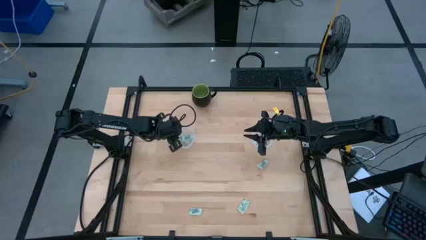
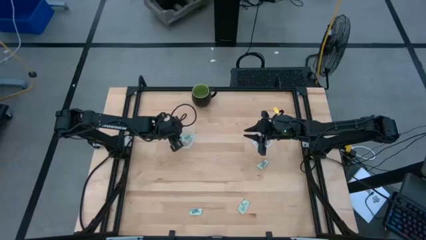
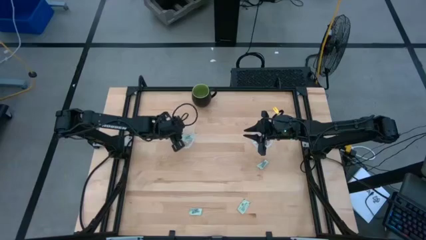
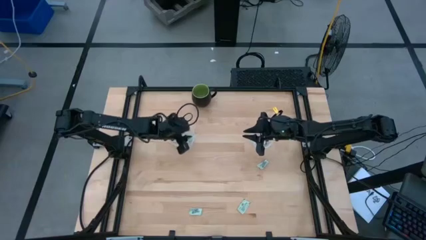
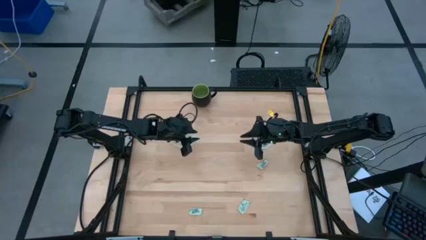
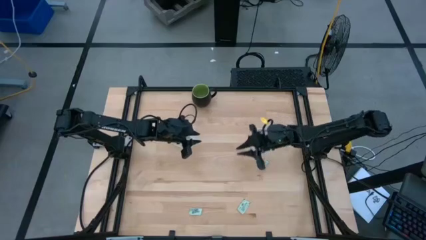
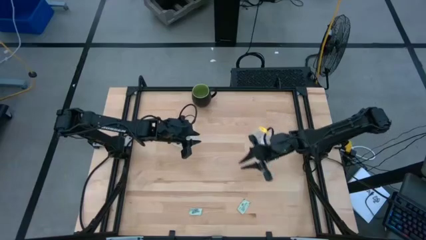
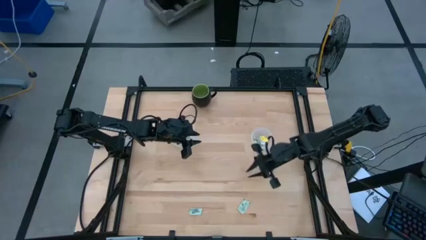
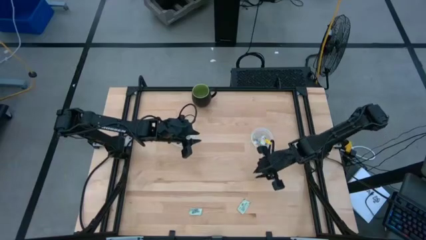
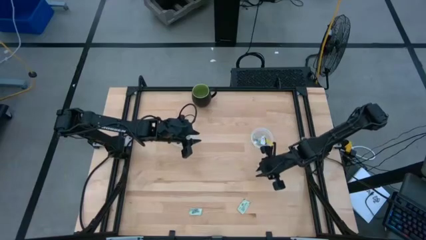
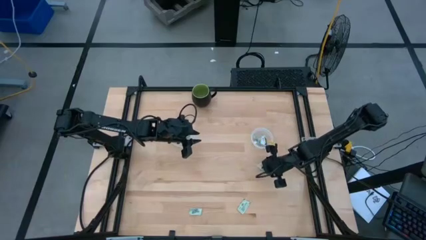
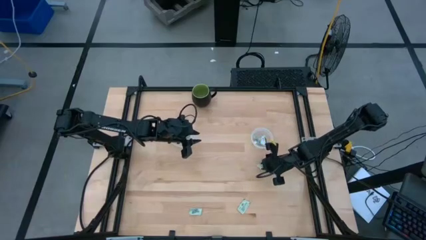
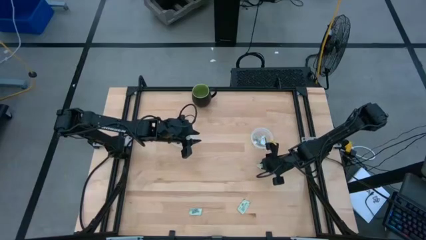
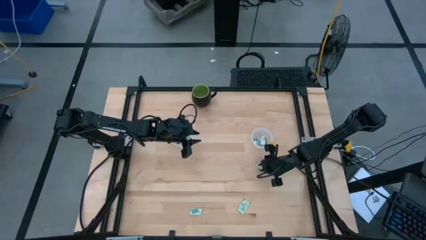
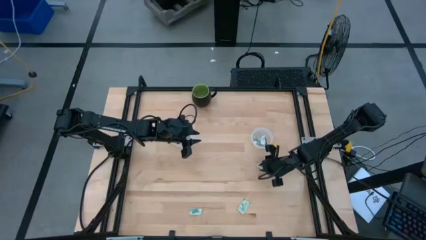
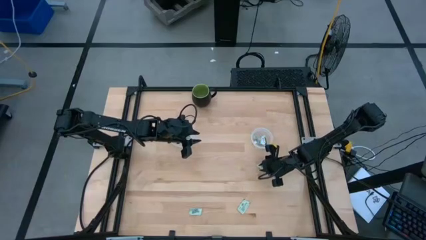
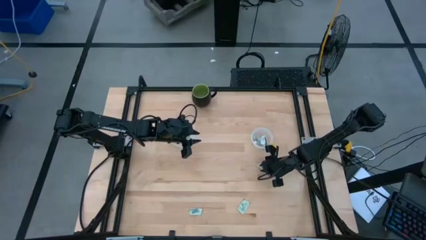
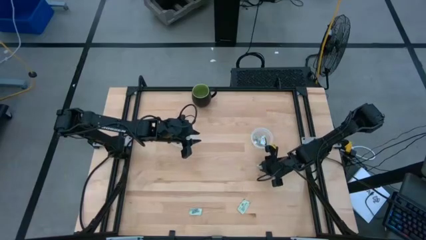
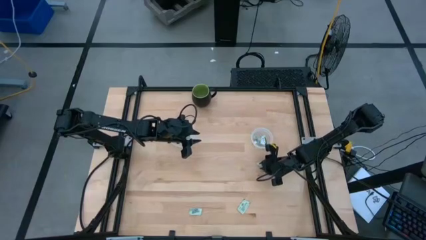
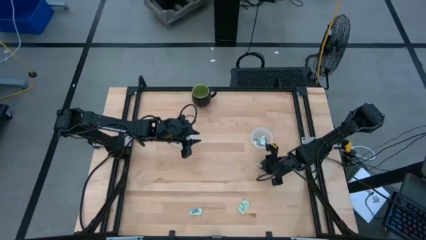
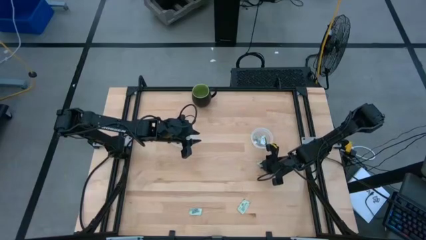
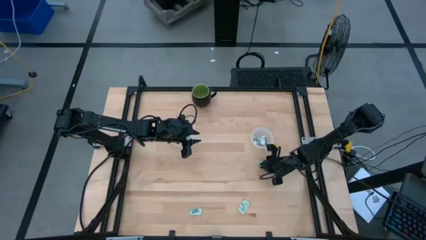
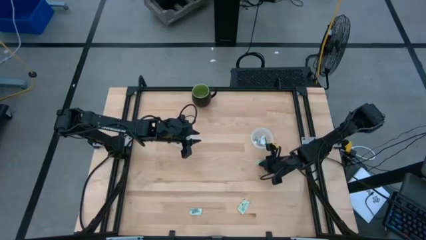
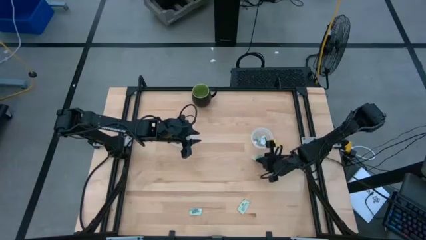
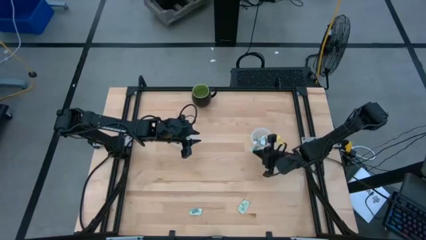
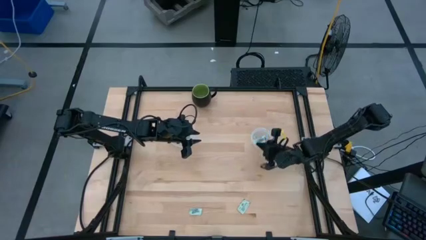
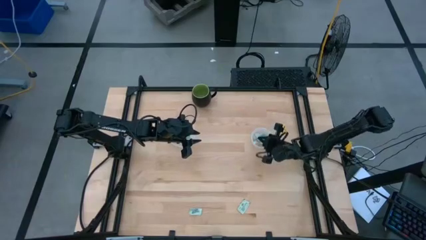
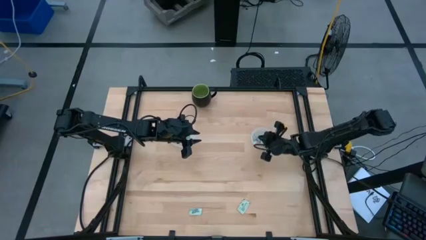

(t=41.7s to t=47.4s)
Task: Pick and place Stevia / Truvia into bins
Put the white stevia packet into the right transparent container

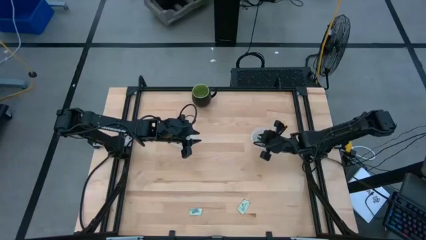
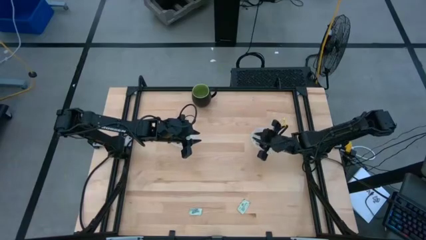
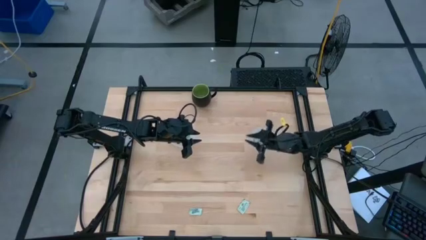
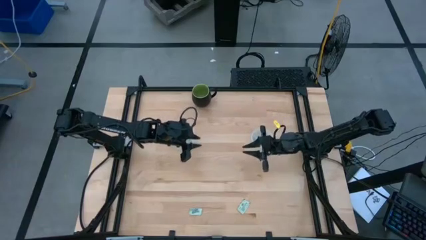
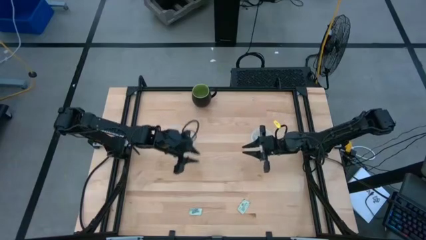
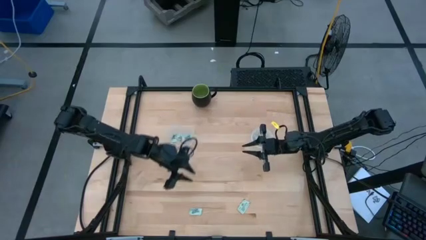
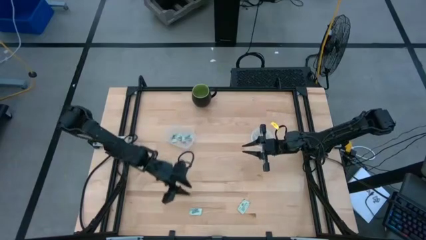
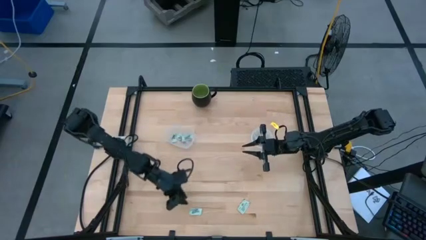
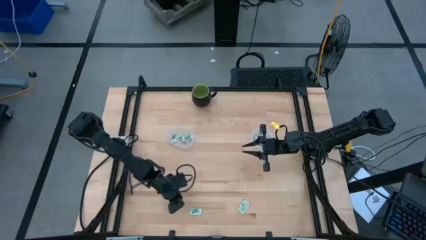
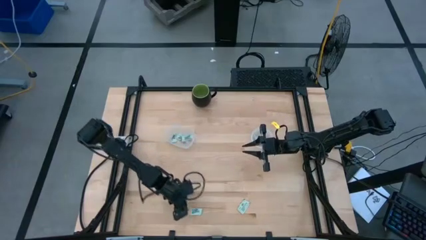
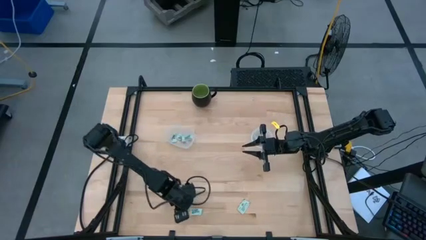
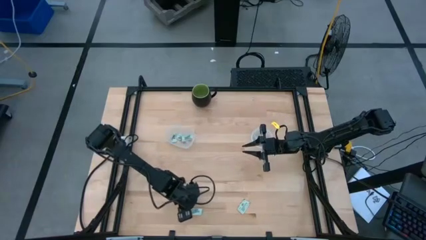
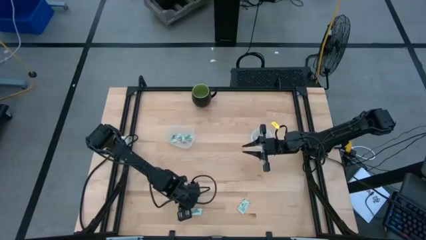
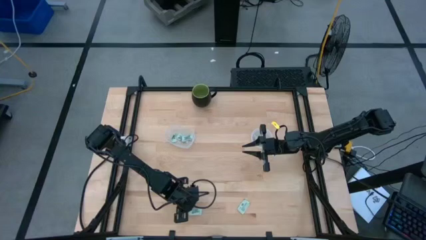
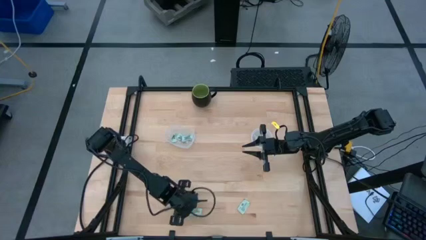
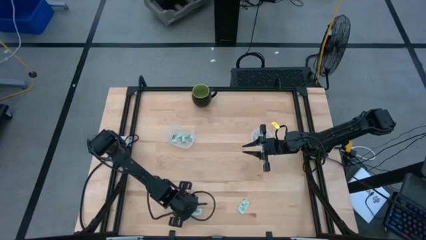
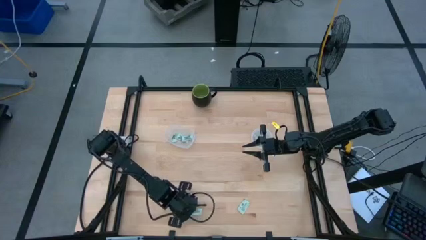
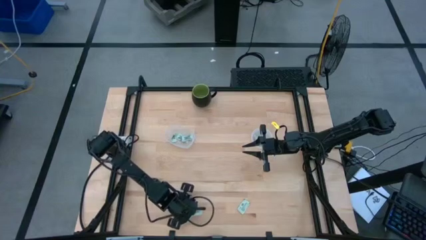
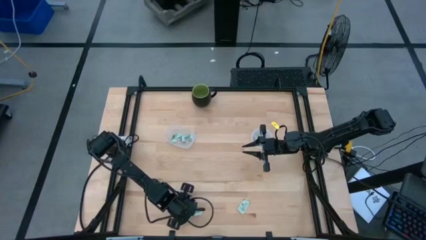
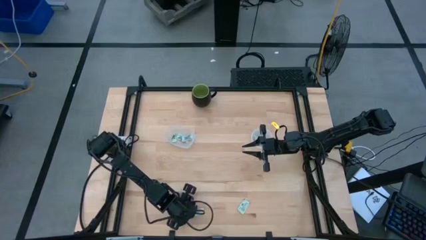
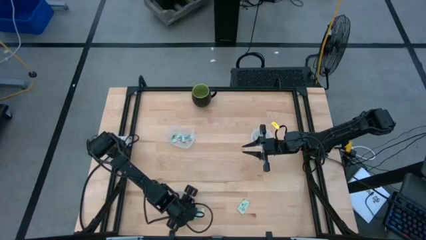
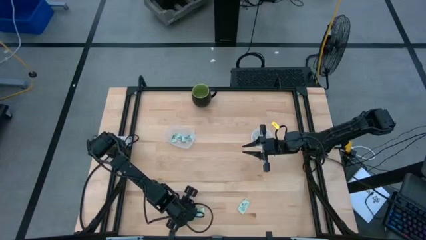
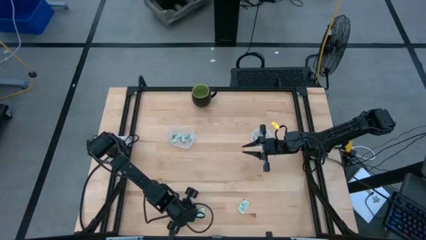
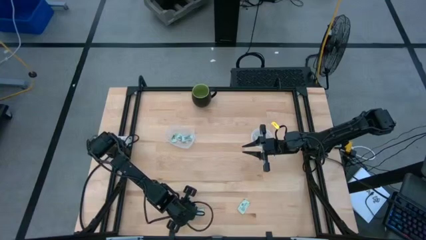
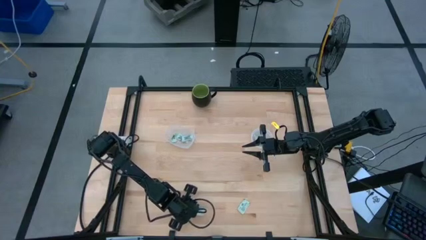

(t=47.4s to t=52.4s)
Put the white stevia packet into the left transparent container

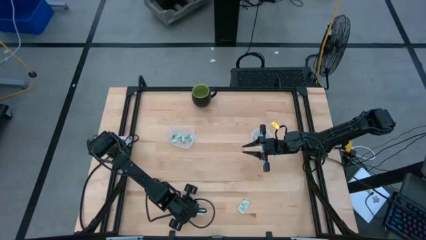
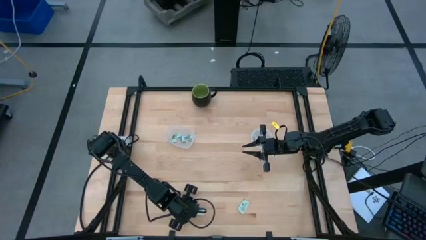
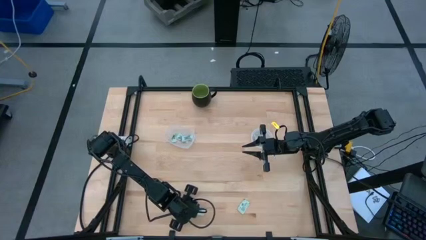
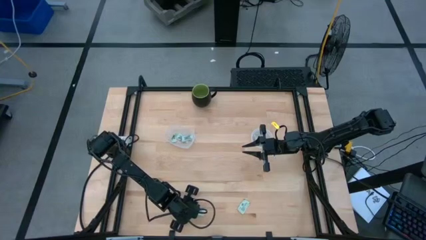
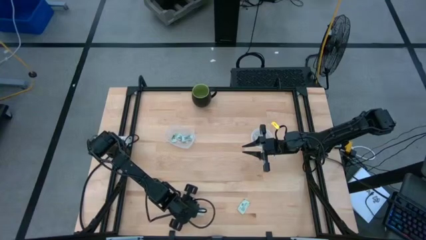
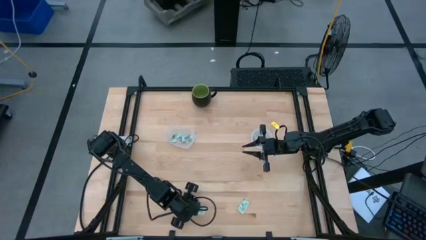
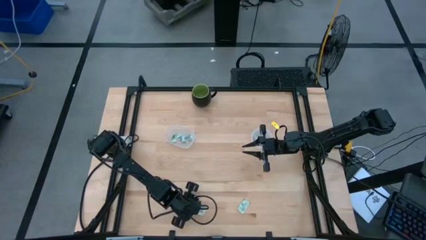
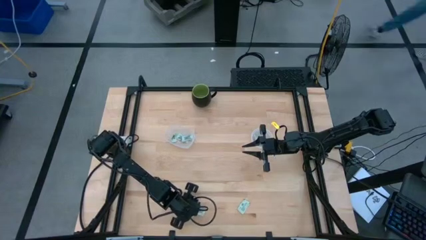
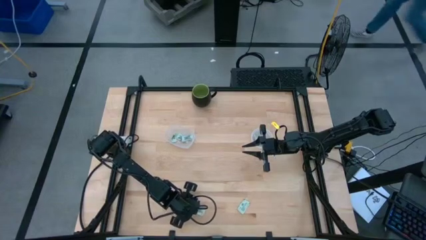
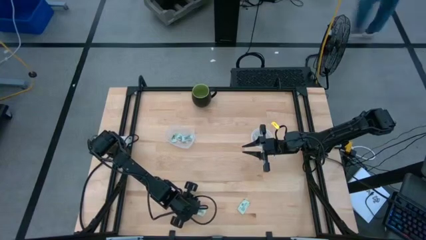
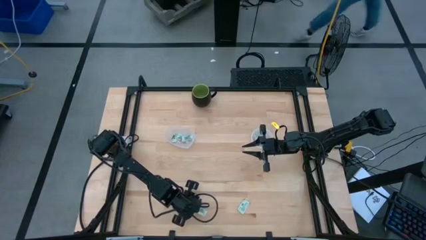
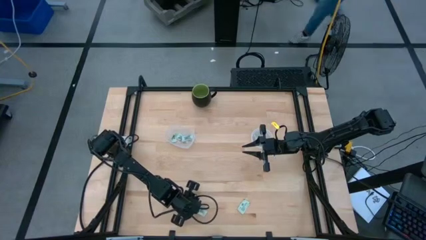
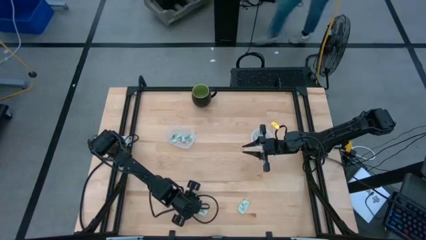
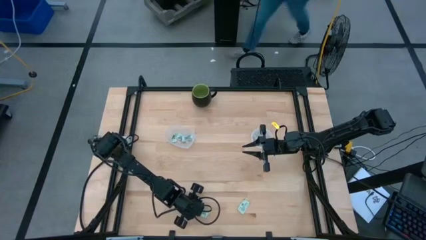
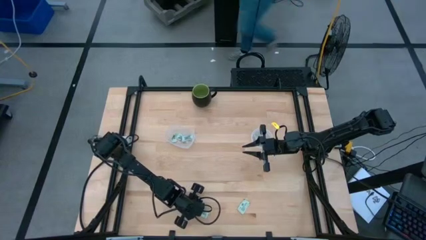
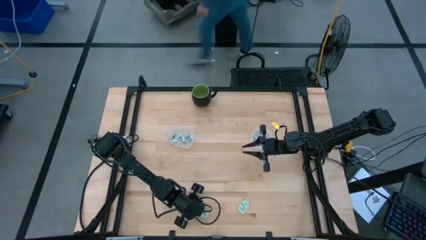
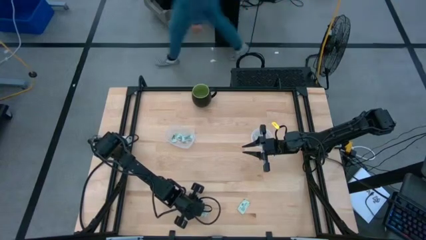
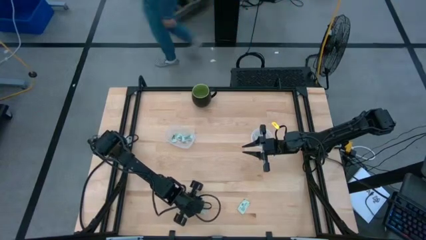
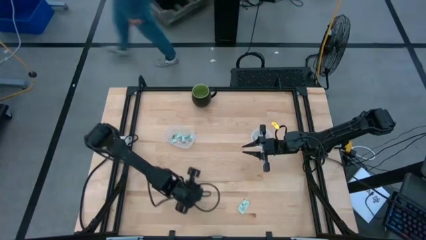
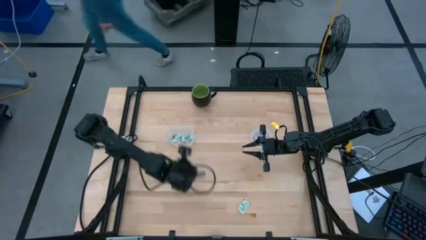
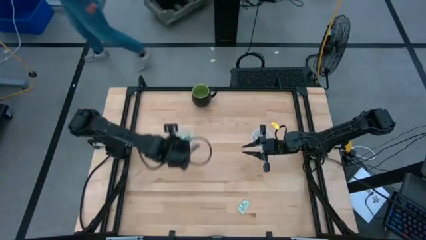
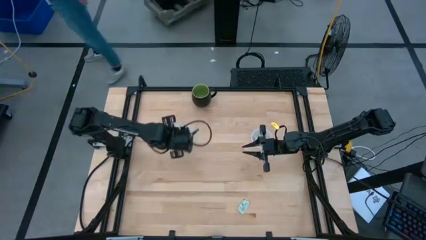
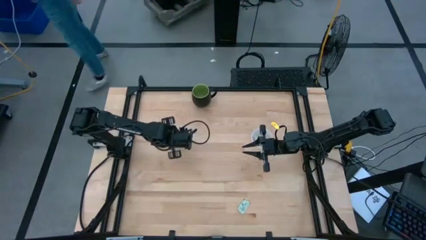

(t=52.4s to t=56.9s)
Put the white stevia packet into the left transparent container

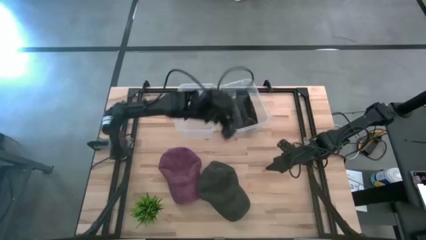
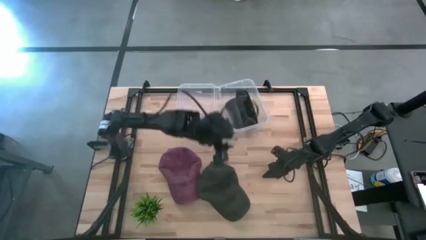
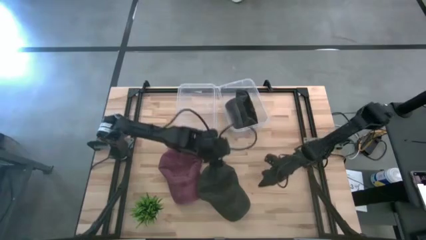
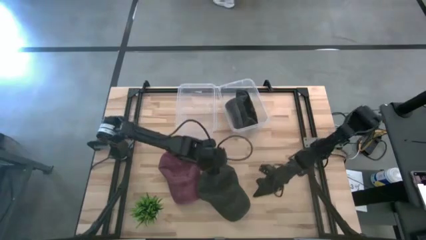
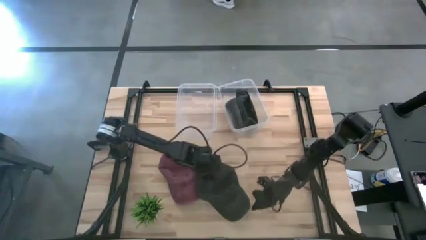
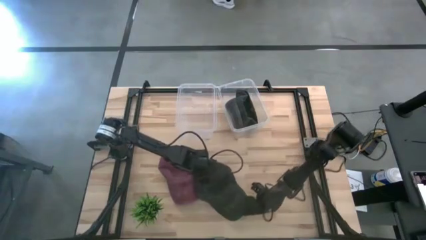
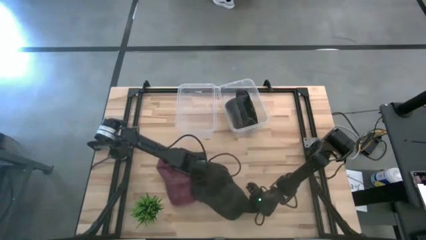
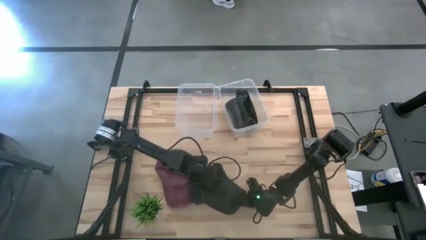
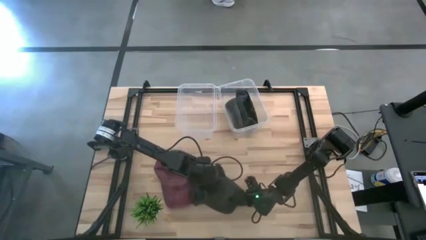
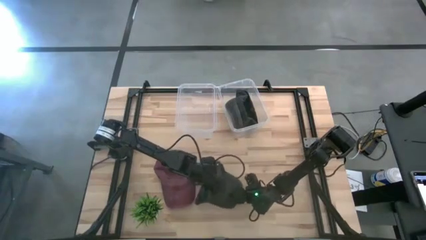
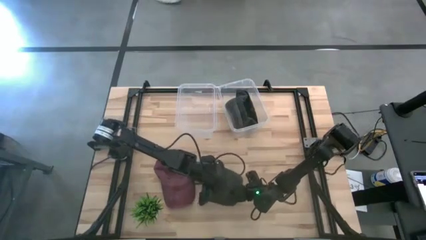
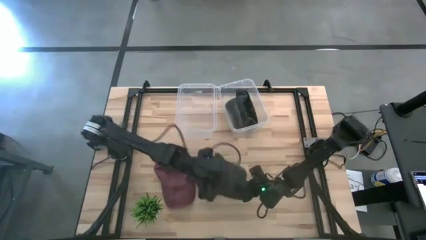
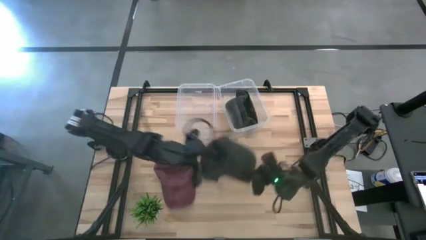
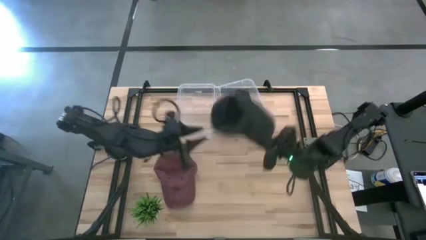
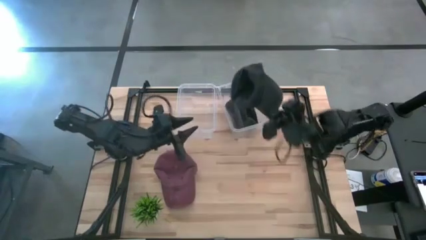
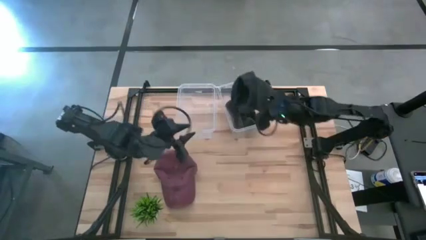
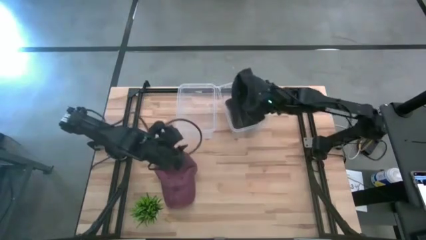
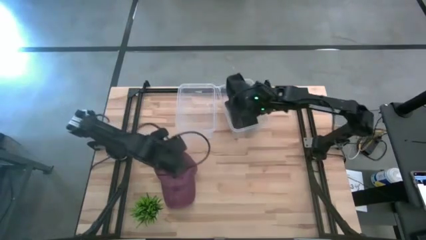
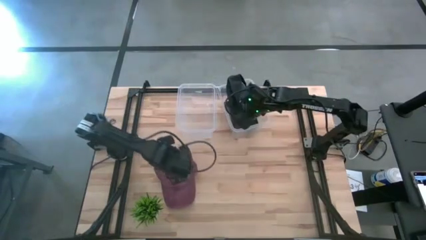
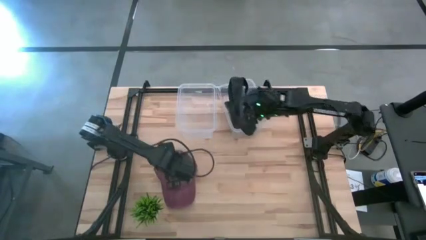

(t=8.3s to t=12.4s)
Task: Pick & Place hat
Put the black cap into the right transparent bin
